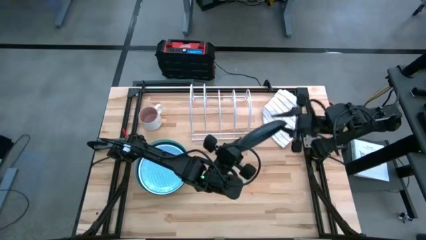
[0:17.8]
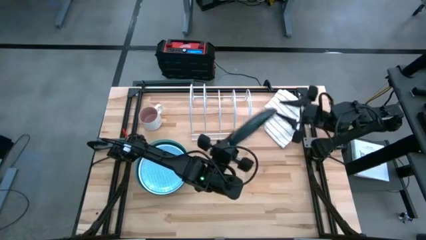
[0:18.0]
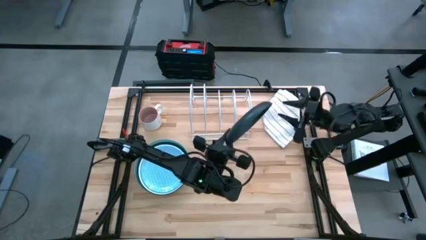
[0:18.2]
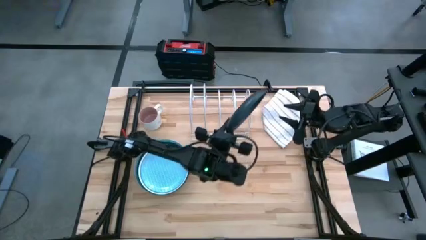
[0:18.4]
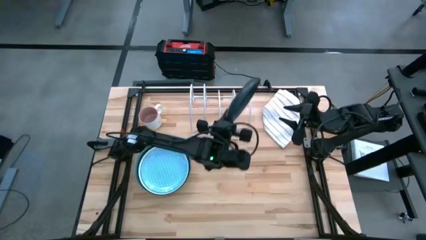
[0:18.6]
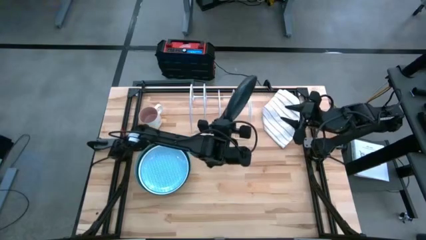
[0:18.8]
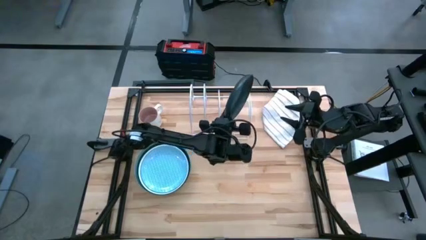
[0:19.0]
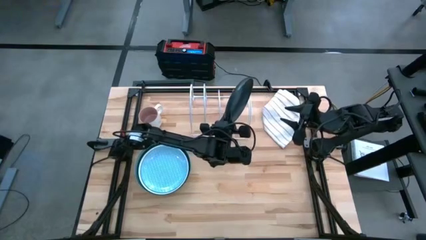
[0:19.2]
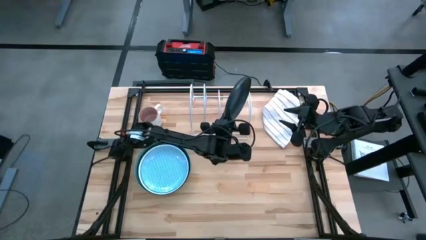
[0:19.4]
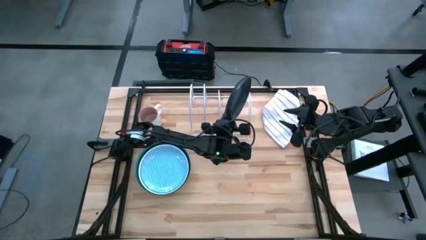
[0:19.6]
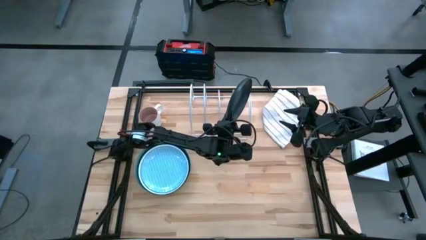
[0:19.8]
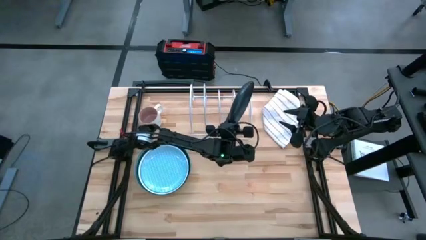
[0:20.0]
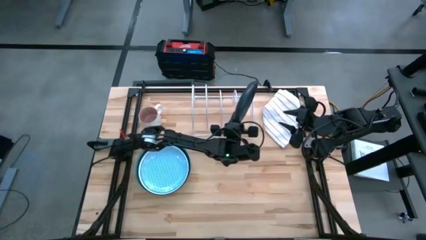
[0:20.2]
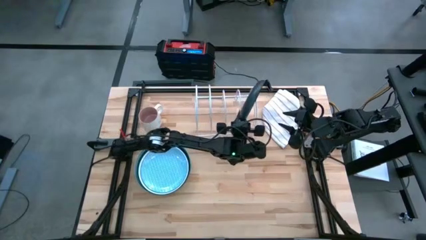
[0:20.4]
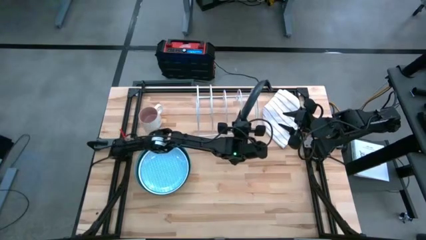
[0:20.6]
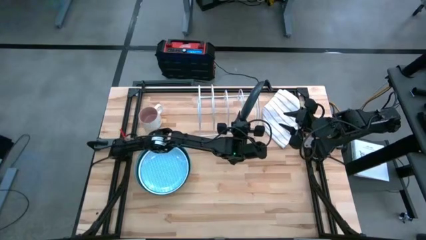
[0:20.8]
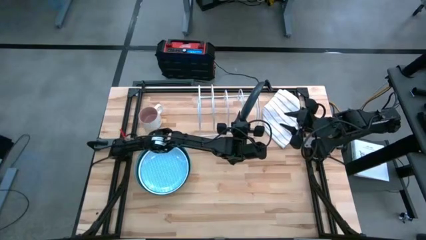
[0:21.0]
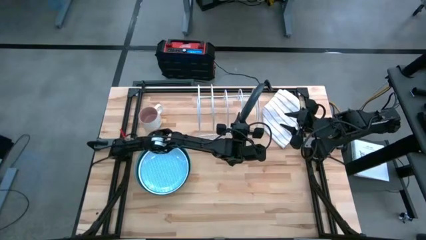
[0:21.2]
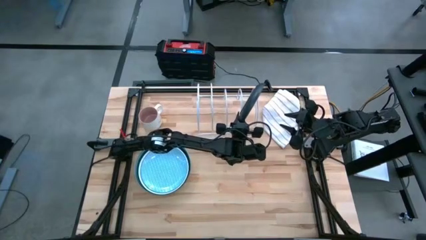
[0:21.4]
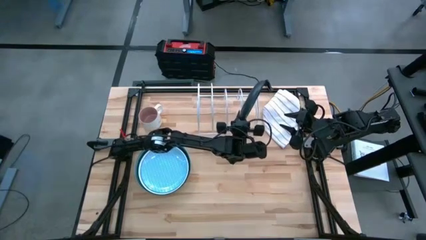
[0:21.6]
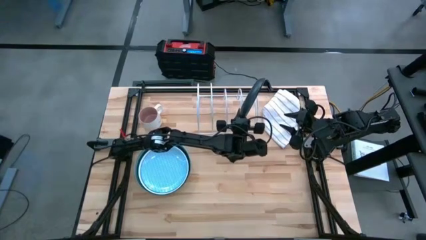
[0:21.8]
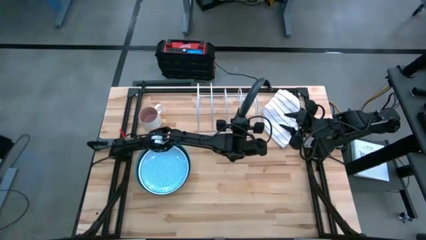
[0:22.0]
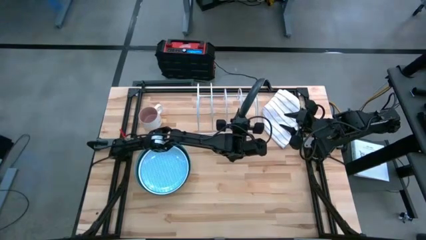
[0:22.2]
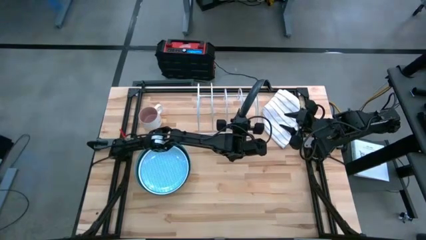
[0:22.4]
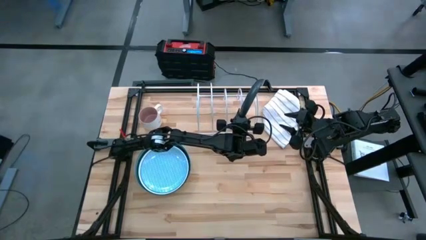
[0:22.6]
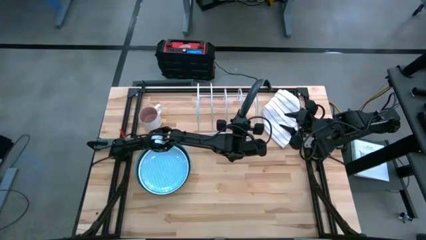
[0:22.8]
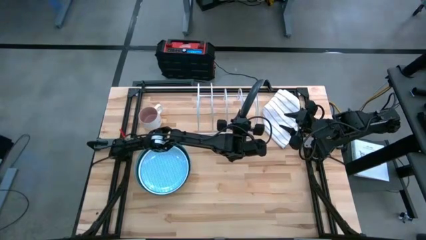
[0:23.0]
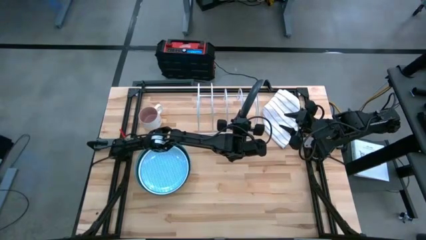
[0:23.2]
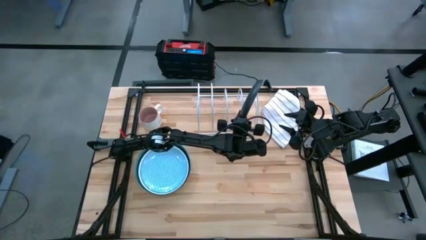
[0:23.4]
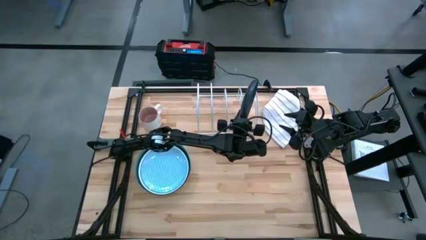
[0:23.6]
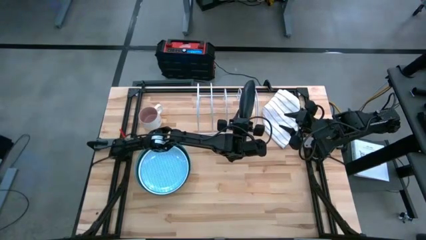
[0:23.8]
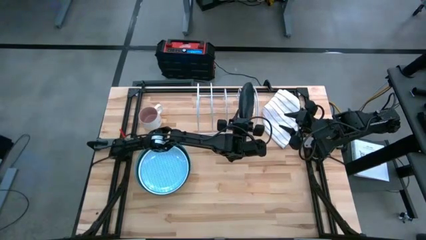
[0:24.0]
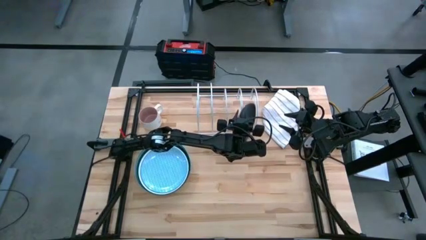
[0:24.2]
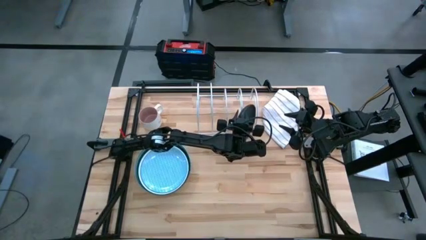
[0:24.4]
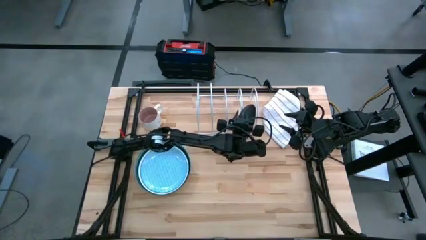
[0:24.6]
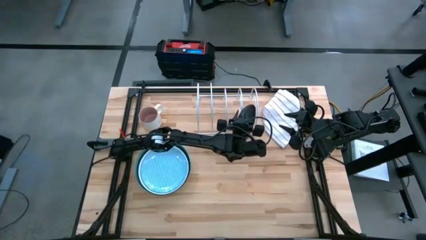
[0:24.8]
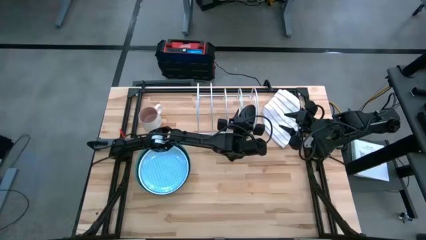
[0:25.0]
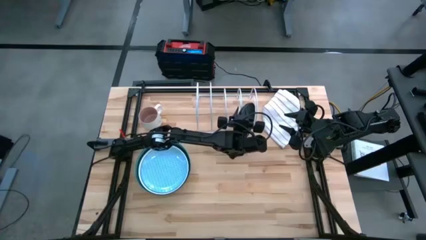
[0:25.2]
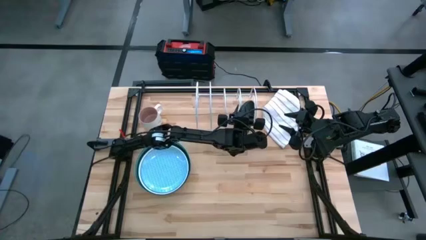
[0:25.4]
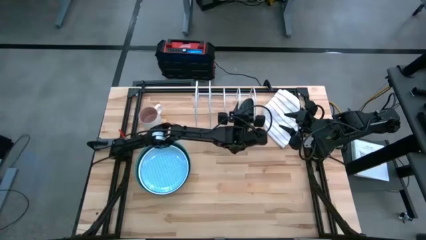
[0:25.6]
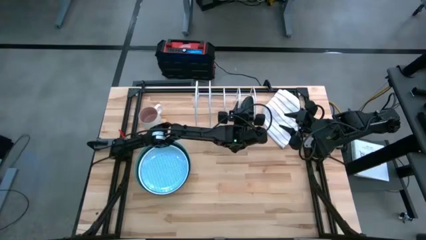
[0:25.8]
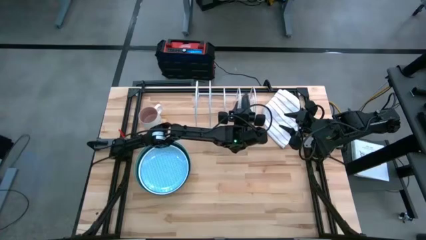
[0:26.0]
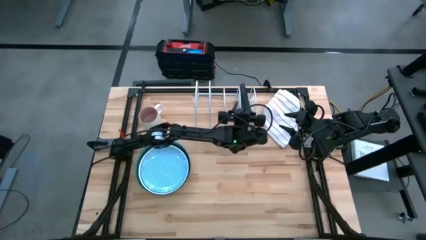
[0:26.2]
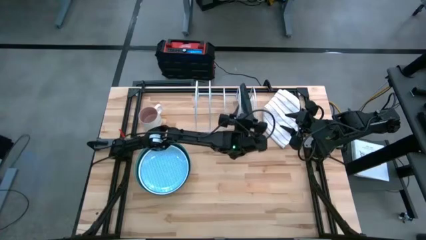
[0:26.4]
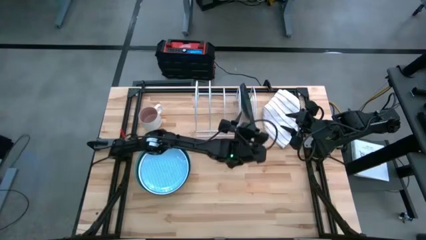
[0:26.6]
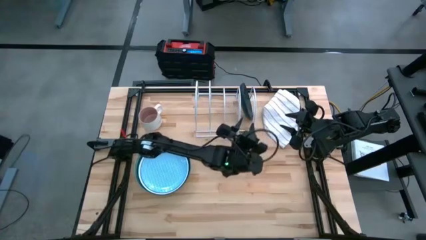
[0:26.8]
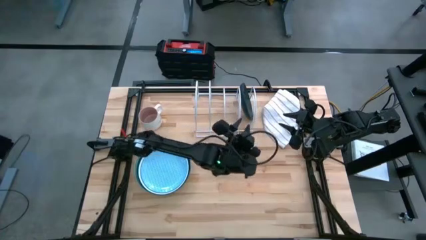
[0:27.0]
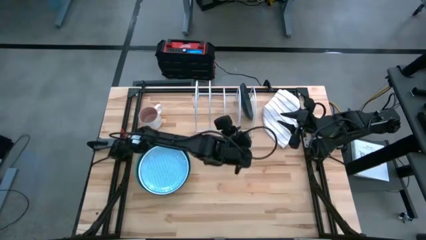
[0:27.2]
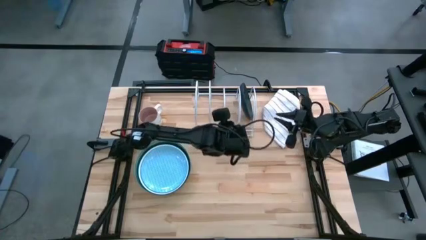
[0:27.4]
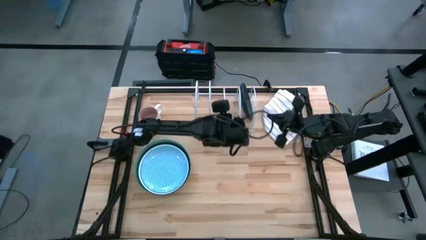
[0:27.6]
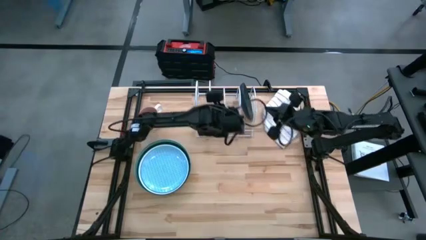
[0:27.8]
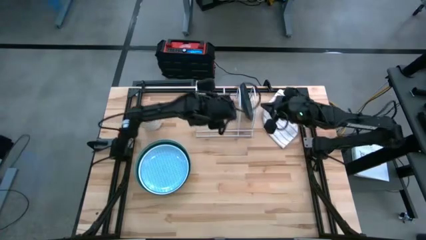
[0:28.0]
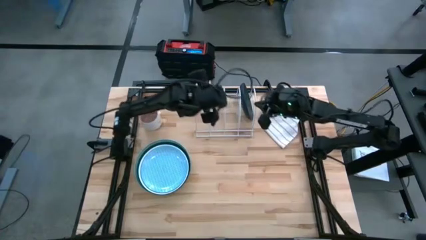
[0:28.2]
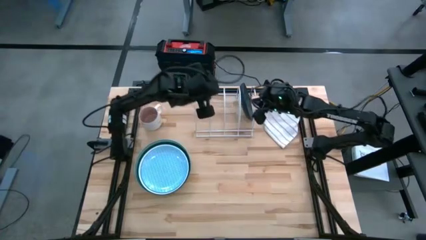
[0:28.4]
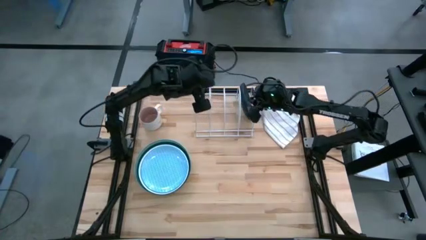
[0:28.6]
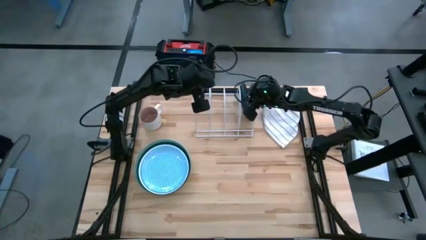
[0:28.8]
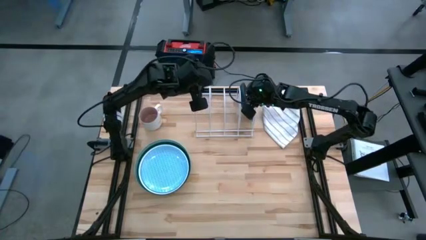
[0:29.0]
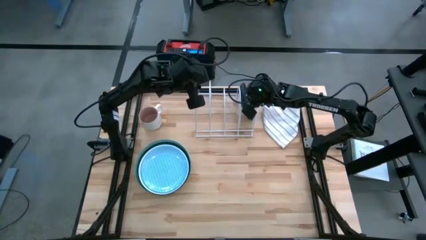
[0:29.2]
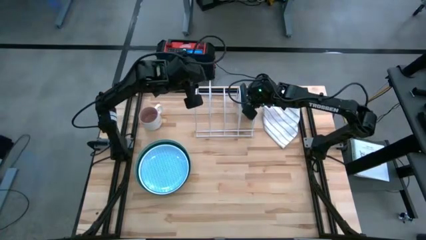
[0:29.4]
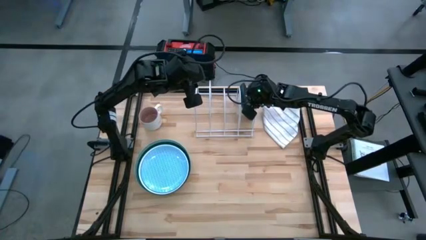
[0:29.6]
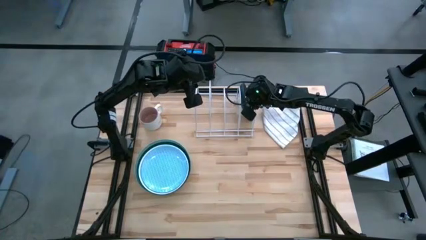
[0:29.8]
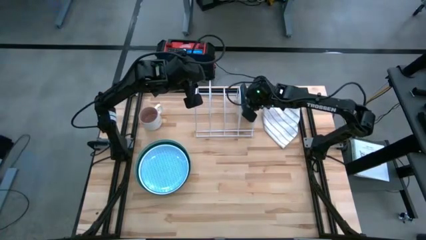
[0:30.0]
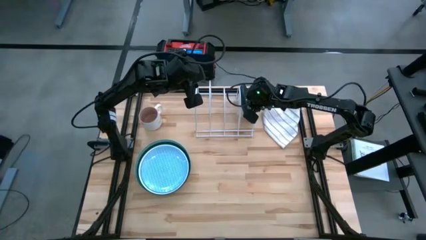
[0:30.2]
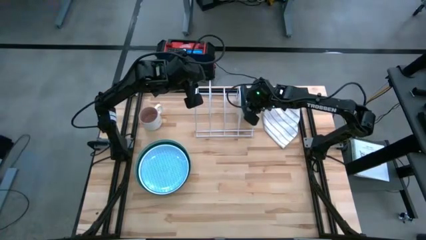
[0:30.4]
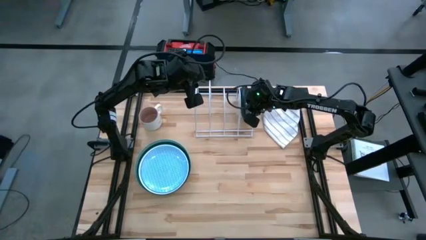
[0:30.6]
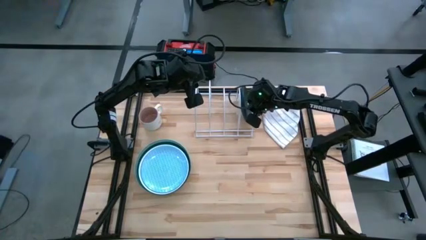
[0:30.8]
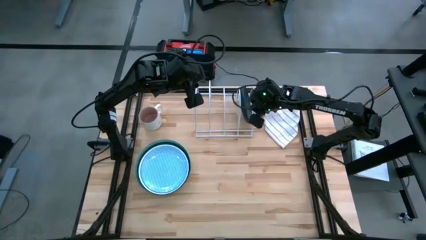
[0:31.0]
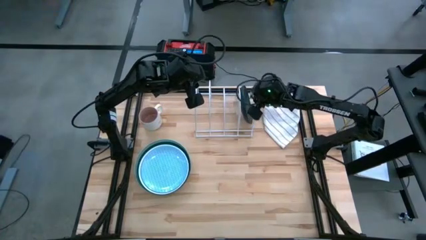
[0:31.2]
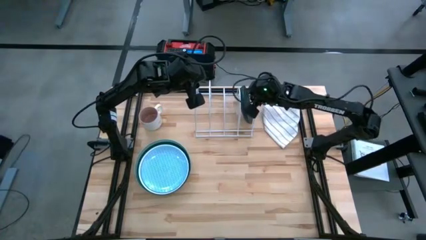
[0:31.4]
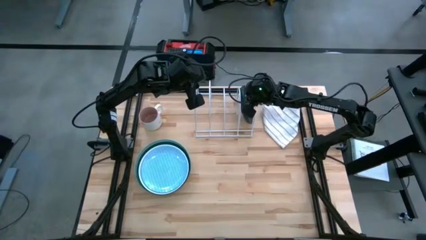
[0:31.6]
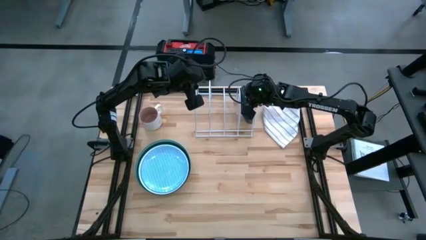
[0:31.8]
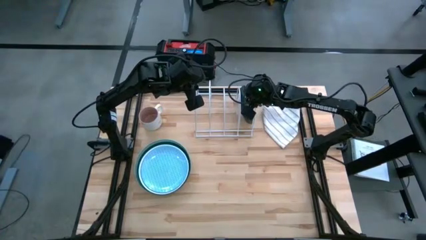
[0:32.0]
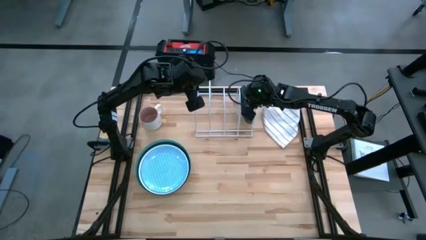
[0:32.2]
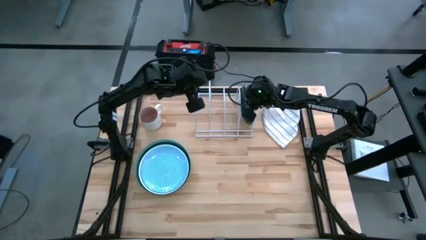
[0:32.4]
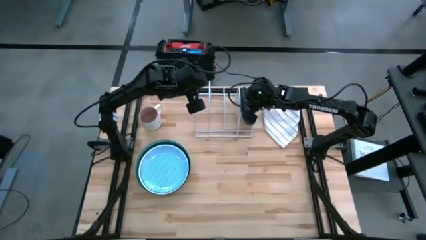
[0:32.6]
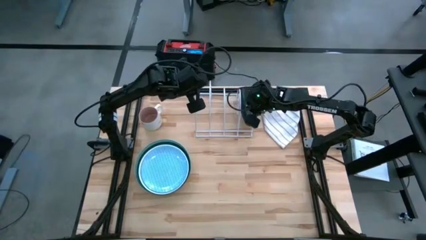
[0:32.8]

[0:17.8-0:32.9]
Task: Sort dishes
Put the black plate in the dishwasher rack

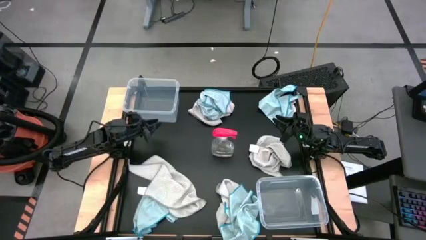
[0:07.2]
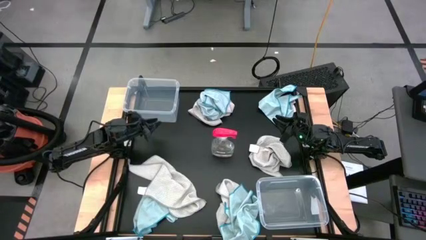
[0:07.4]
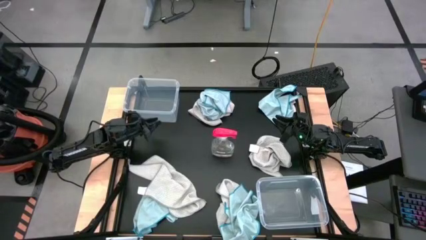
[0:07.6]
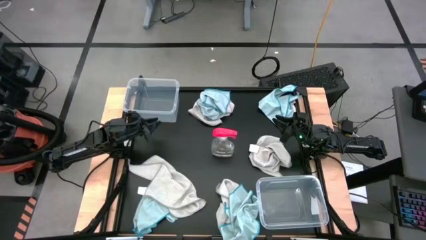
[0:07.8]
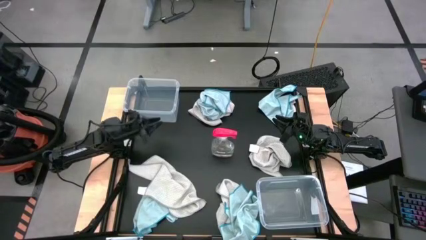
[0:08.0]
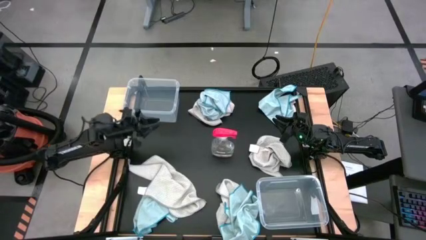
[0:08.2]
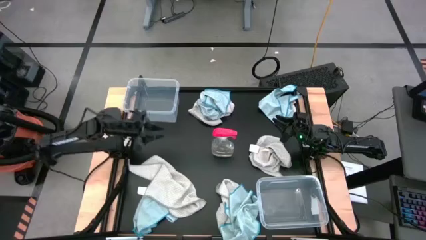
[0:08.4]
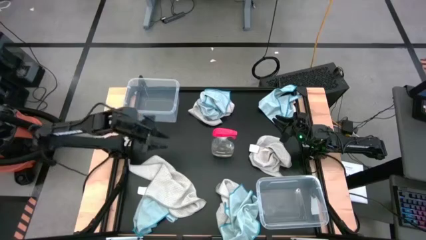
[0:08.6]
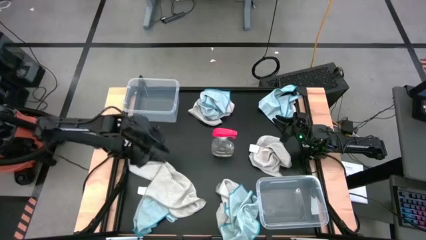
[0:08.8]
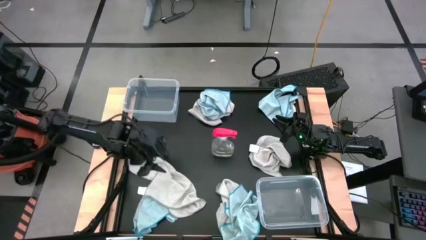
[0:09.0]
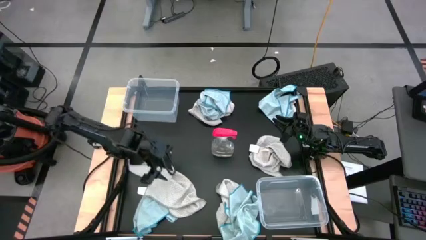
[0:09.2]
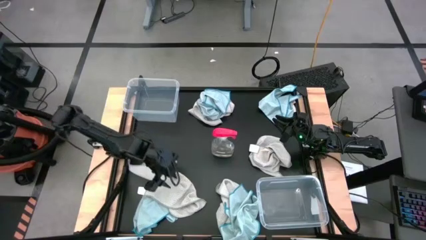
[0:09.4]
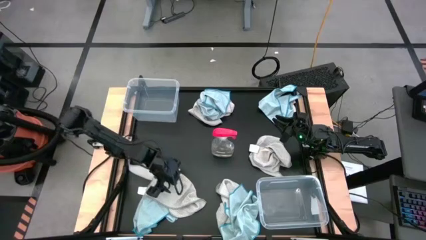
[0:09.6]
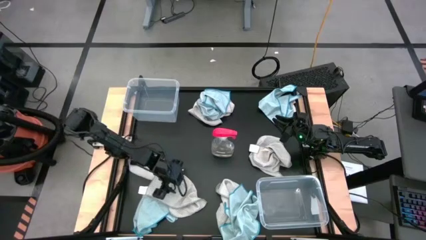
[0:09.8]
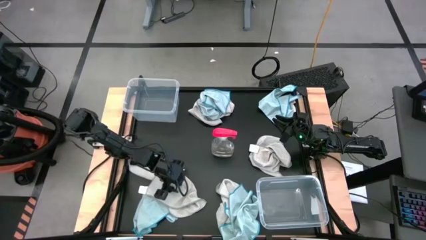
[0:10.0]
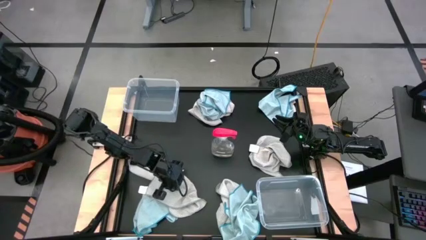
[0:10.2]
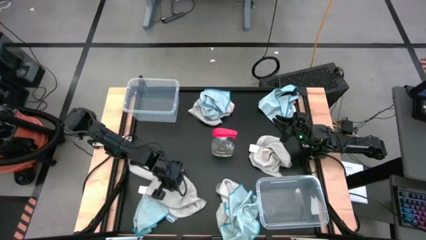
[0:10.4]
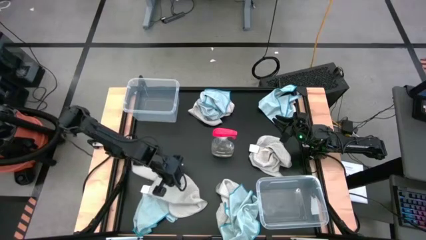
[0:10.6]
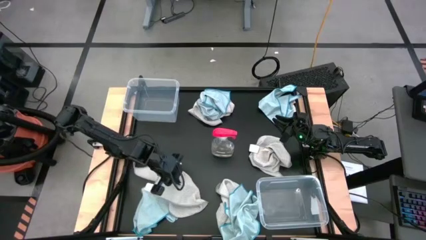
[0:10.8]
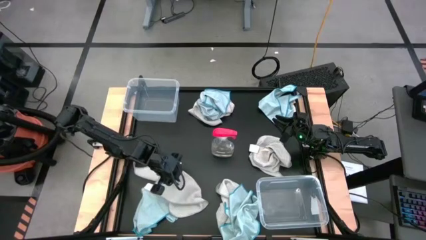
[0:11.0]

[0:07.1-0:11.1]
Task: Sort microfiber towel by color & place in baskets
Put the gray towel into the top transparent bin
